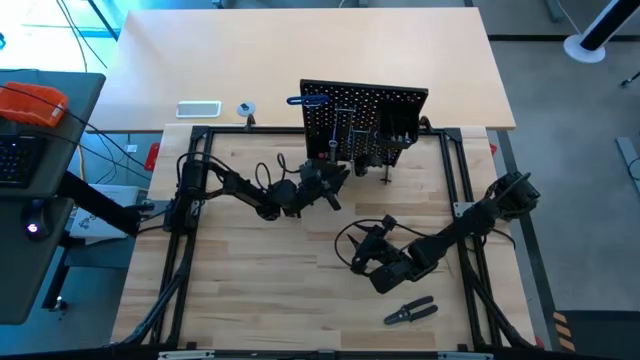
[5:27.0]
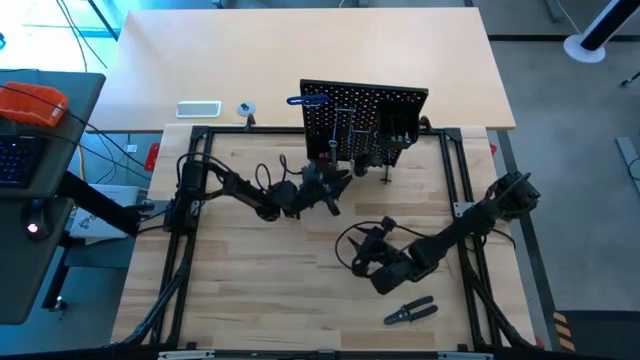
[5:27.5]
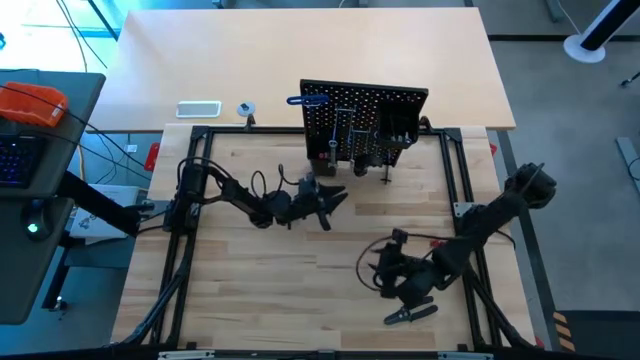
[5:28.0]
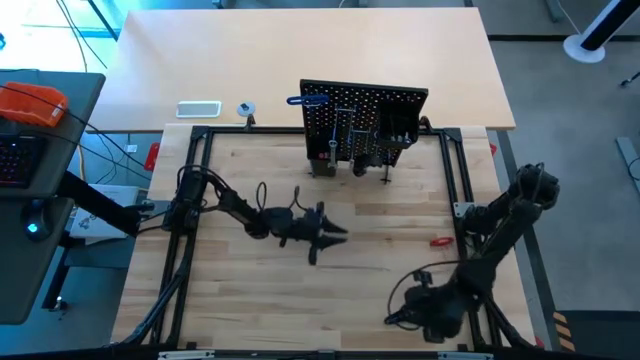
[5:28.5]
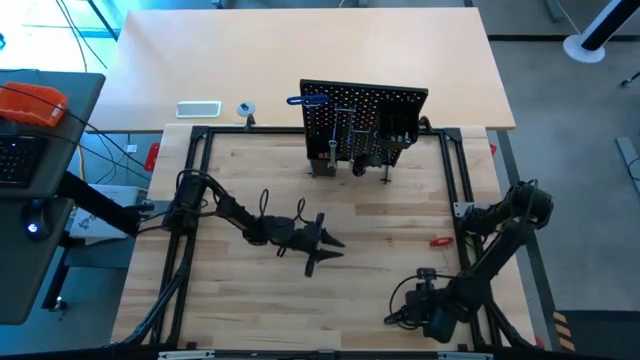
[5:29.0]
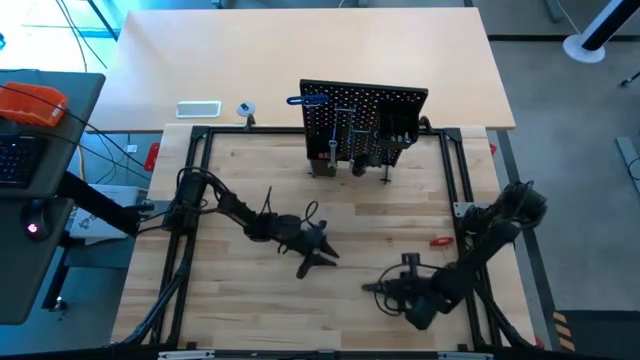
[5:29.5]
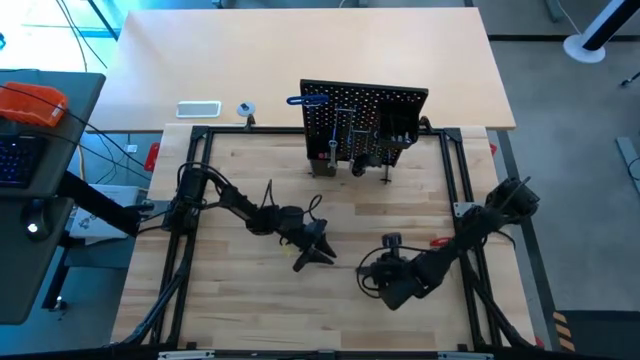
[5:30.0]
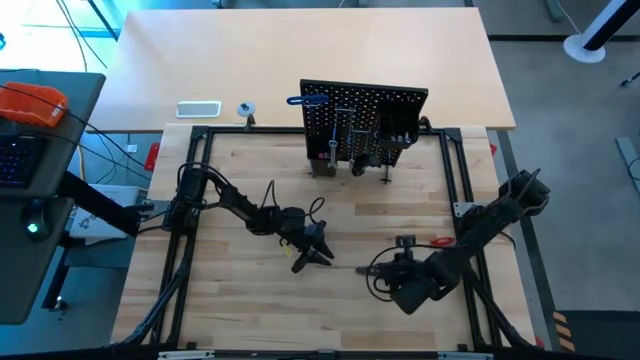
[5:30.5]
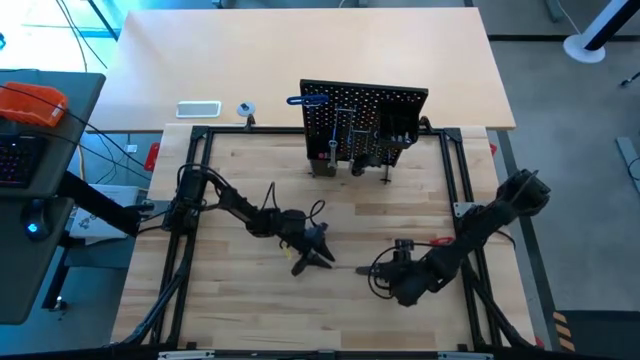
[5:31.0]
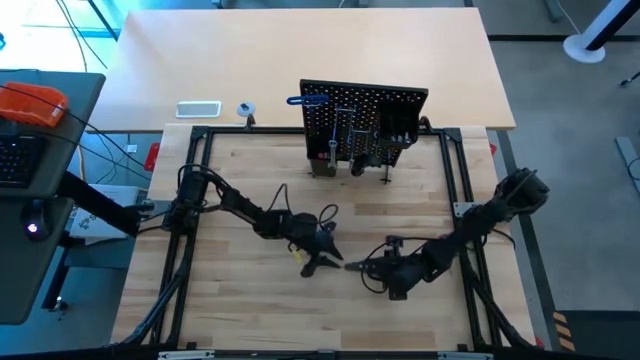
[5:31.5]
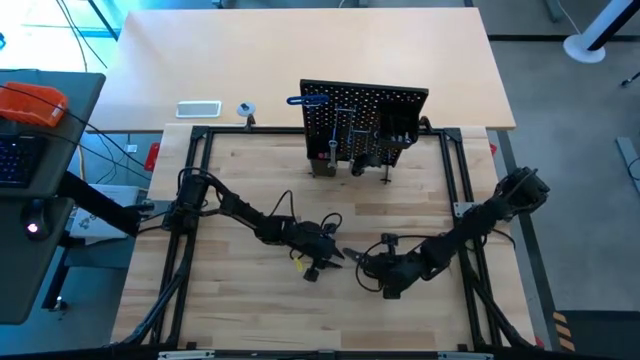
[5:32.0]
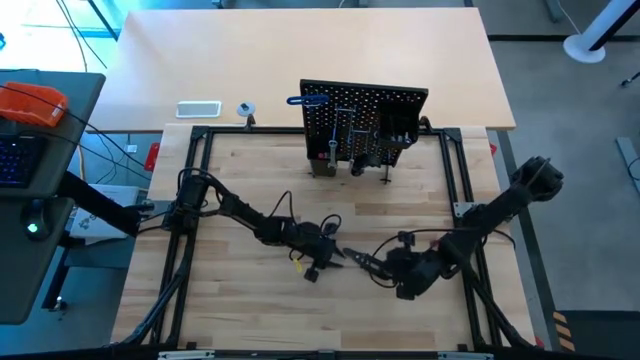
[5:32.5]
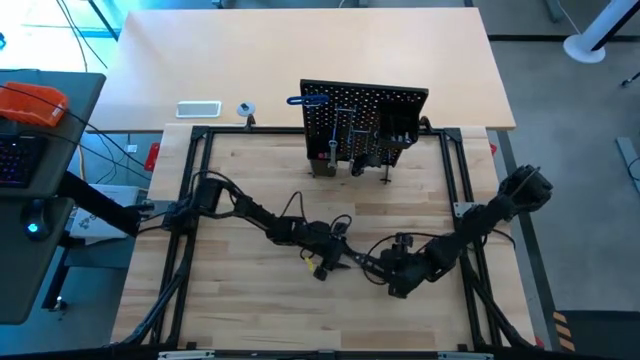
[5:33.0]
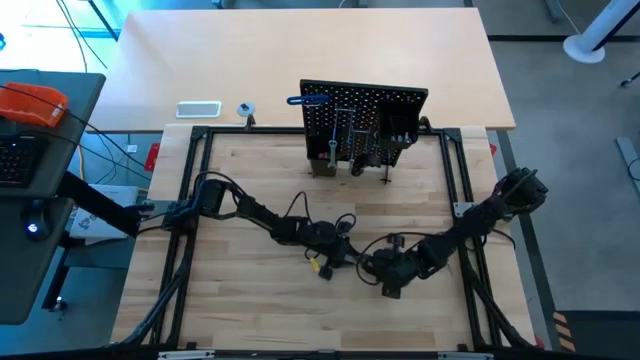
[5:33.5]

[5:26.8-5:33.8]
Task: Hang tools onto peg board
Hang the wire cutter on the pegboard

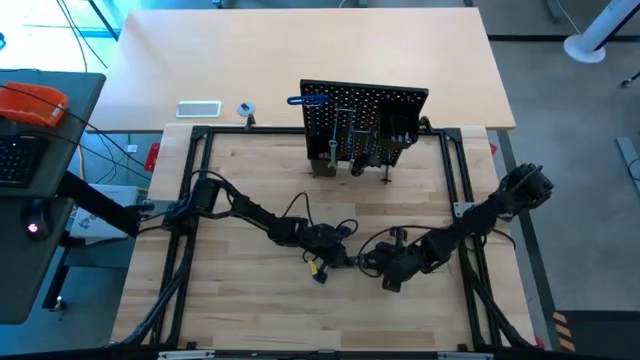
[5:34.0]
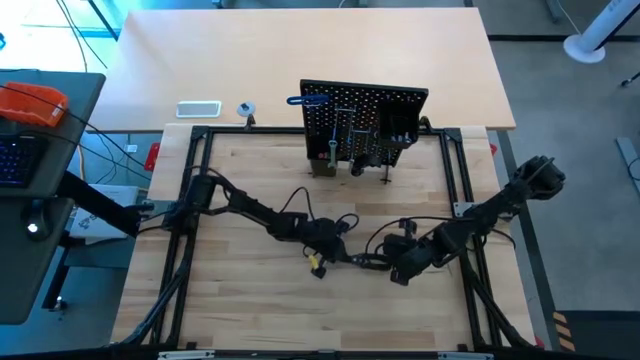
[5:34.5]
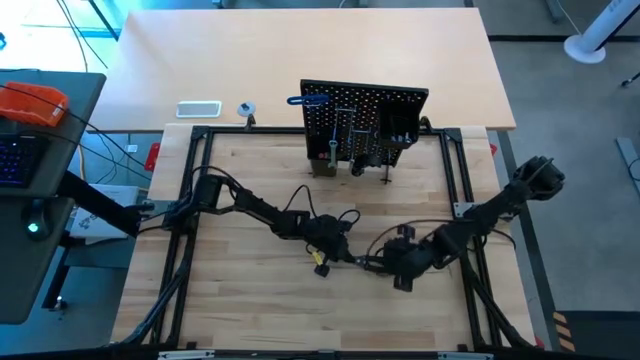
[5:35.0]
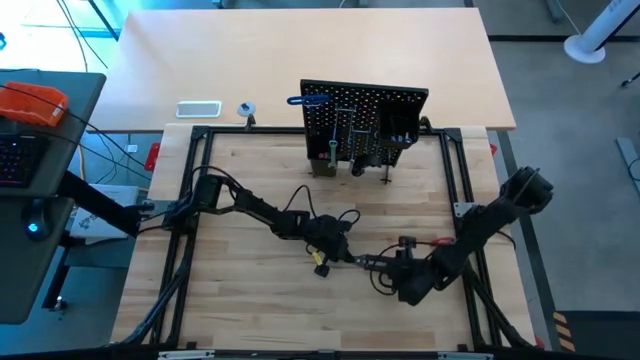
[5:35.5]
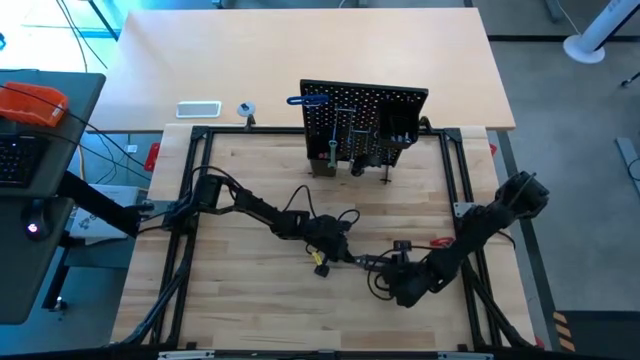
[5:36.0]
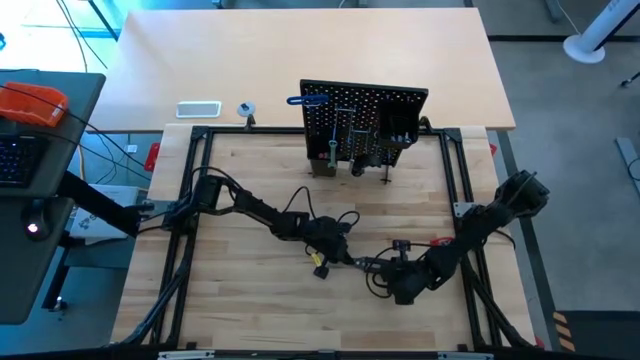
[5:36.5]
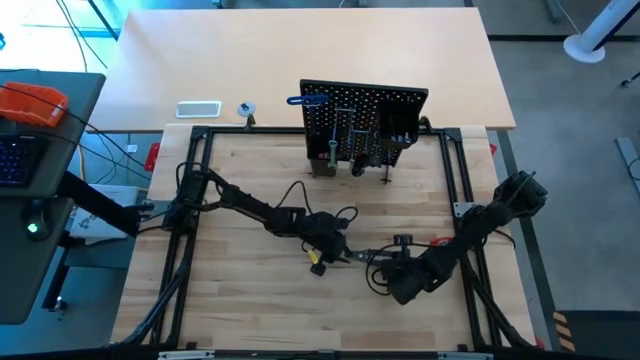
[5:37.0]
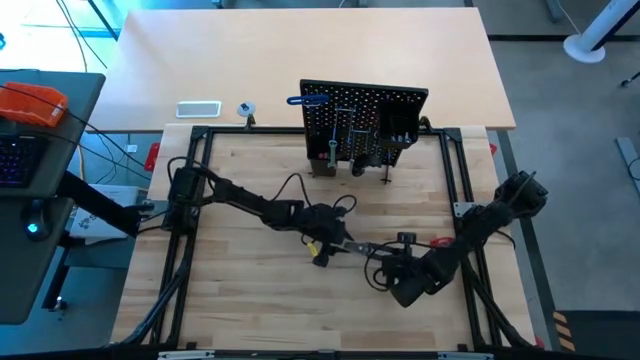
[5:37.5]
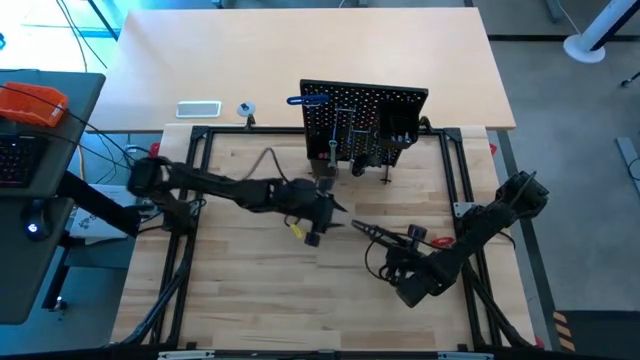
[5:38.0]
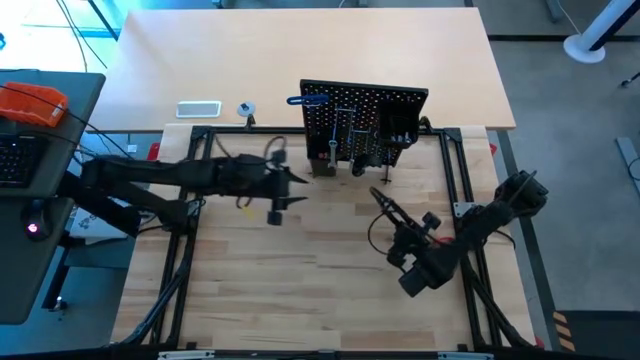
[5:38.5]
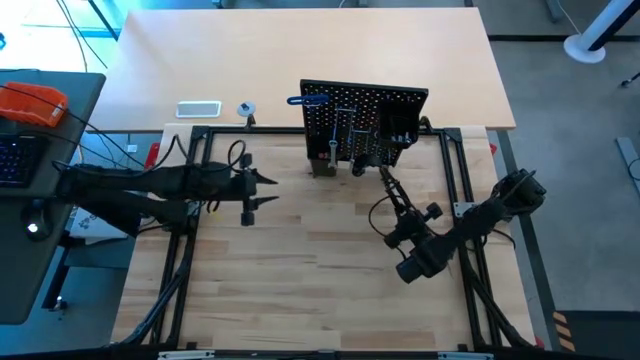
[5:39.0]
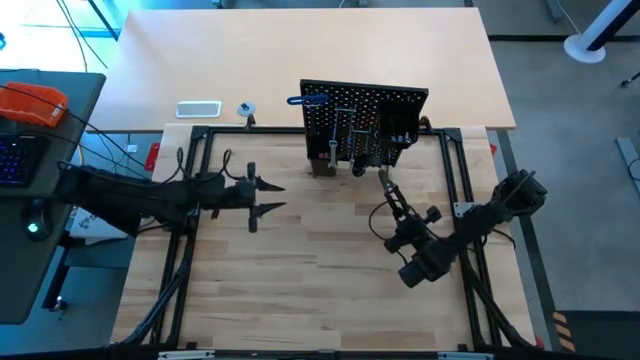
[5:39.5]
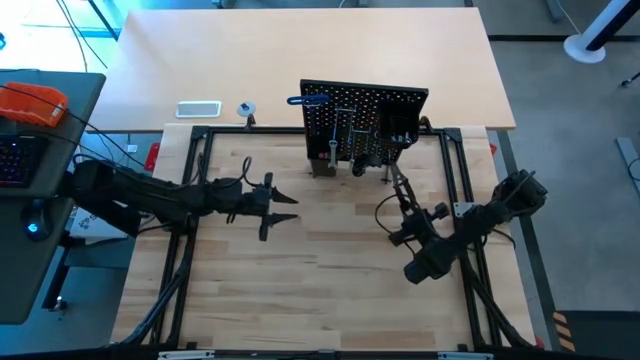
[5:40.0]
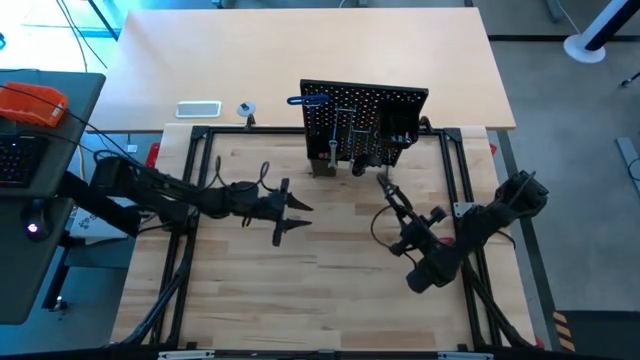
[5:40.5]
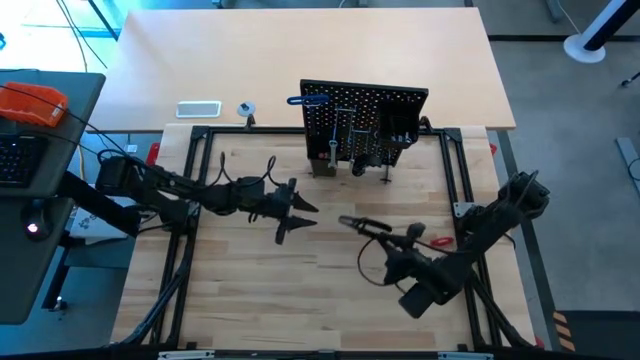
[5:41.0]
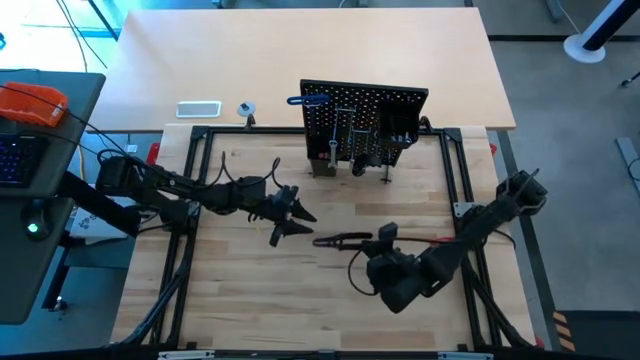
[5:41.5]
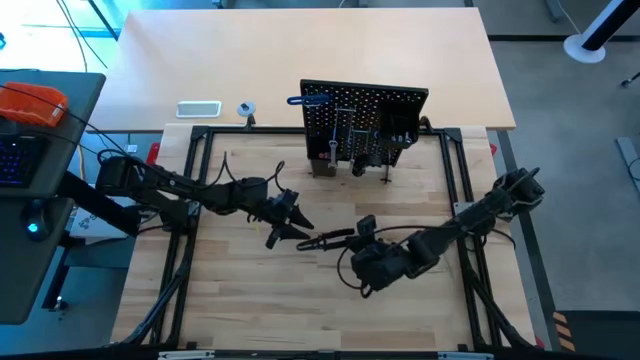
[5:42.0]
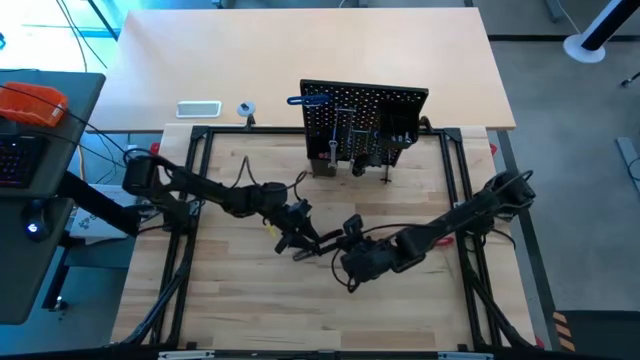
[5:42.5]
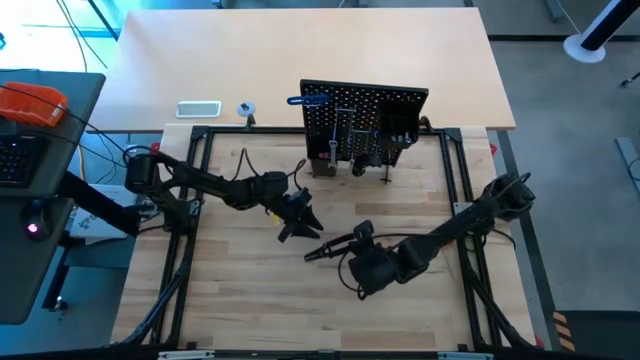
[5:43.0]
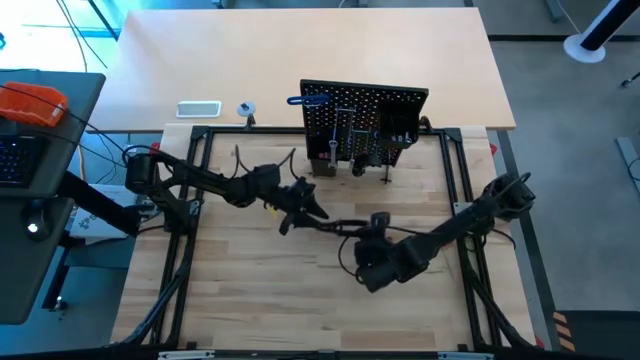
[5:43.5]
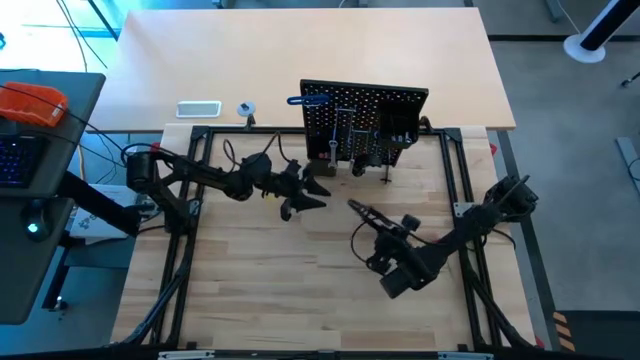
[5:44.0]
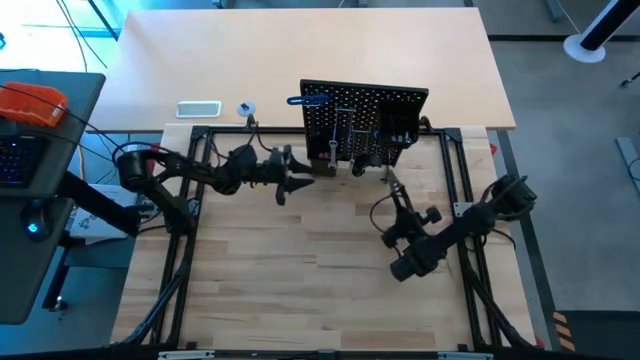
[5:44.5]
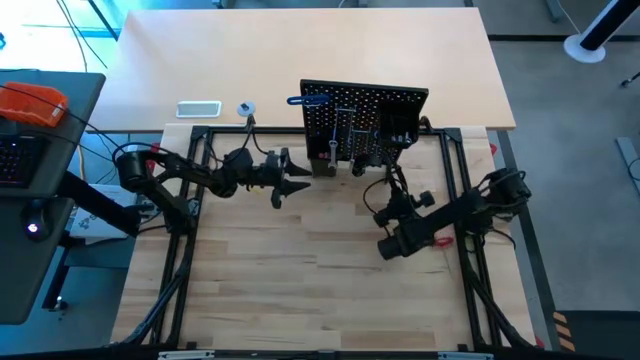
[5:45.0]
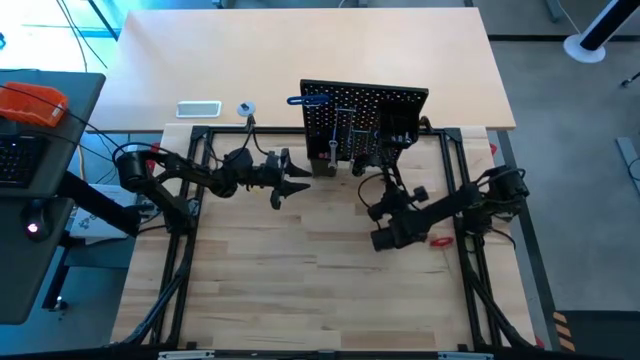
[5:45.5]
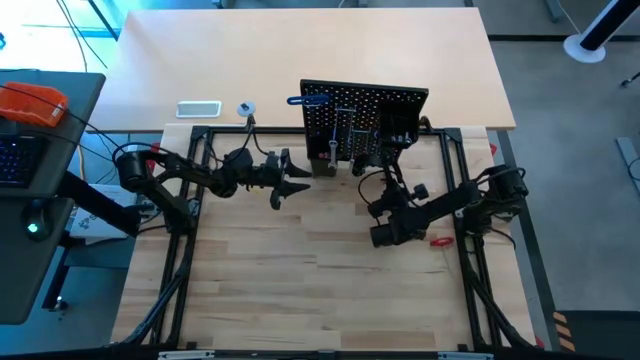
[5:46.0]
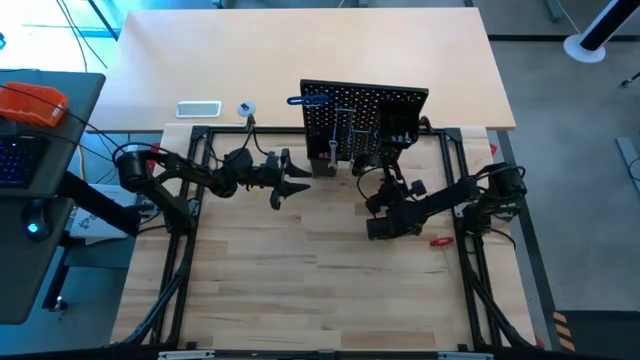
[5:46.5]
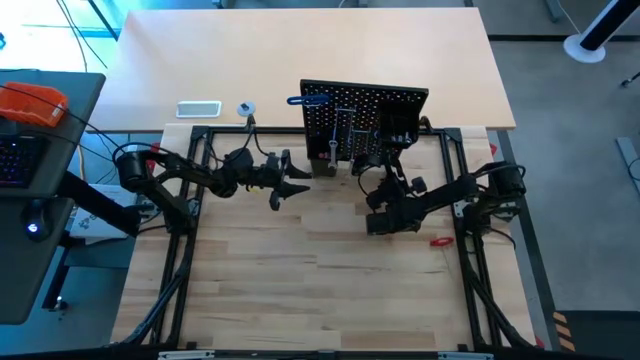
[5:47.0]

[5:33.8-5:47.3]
Hang the wire cutter on the pegboard
